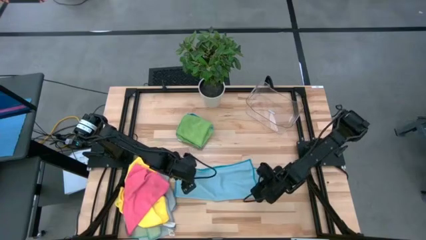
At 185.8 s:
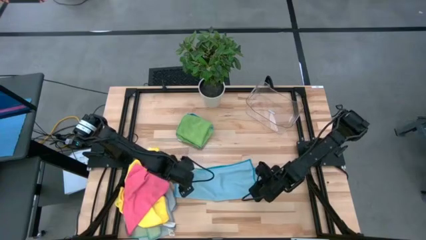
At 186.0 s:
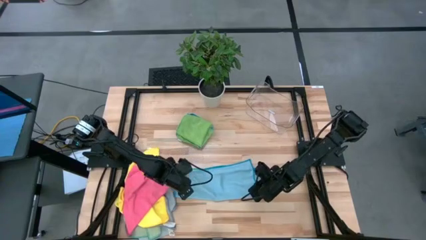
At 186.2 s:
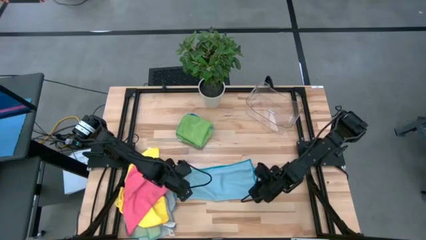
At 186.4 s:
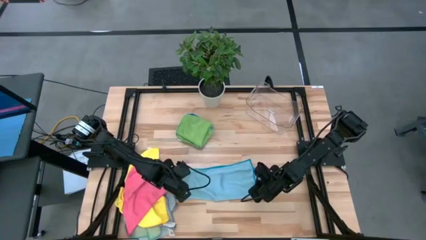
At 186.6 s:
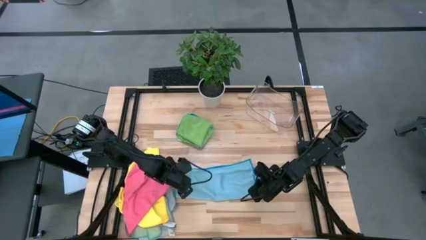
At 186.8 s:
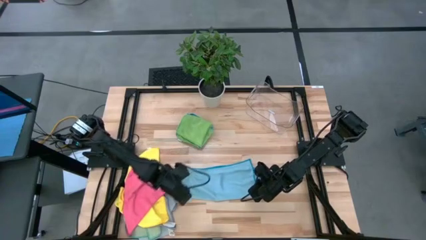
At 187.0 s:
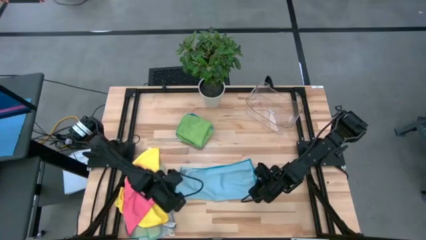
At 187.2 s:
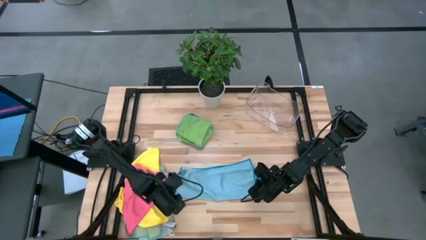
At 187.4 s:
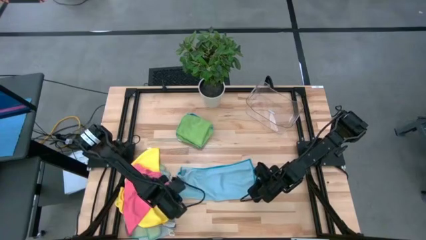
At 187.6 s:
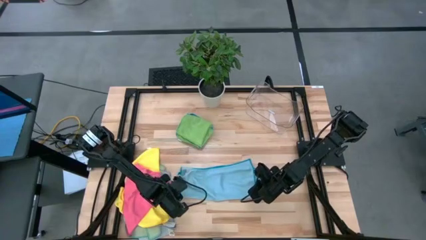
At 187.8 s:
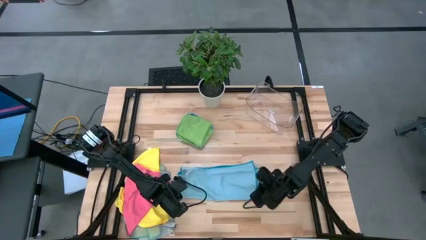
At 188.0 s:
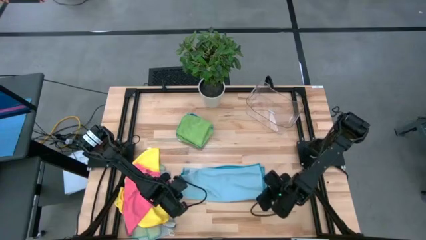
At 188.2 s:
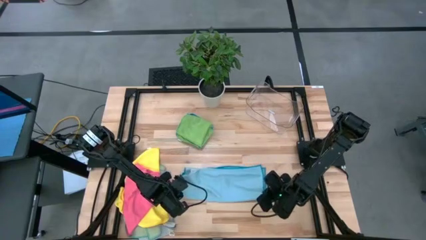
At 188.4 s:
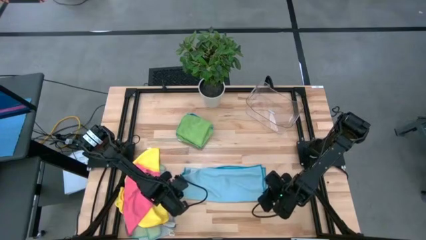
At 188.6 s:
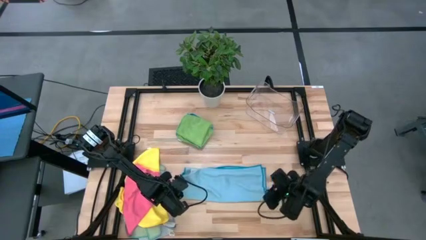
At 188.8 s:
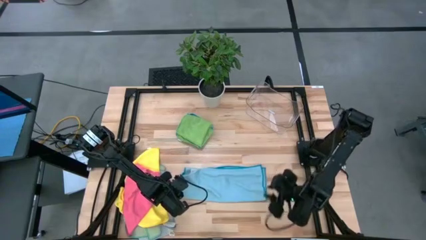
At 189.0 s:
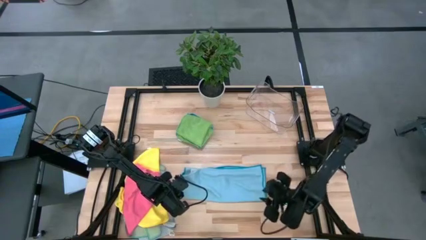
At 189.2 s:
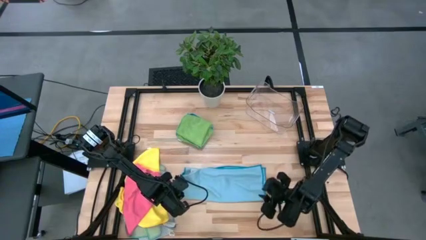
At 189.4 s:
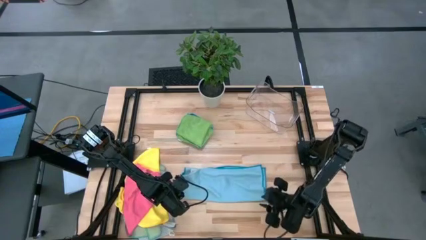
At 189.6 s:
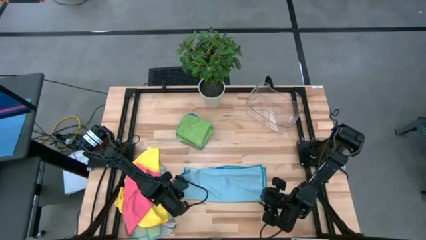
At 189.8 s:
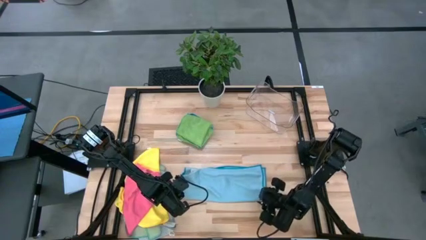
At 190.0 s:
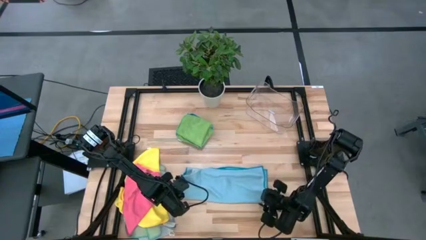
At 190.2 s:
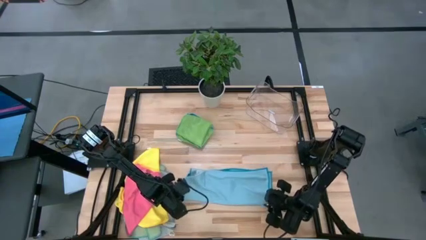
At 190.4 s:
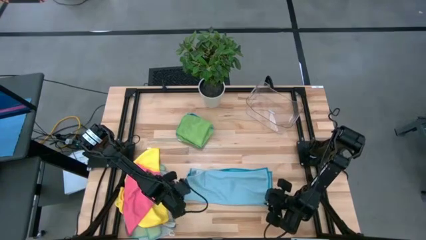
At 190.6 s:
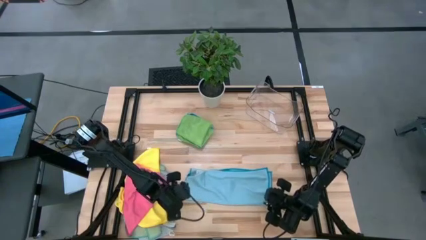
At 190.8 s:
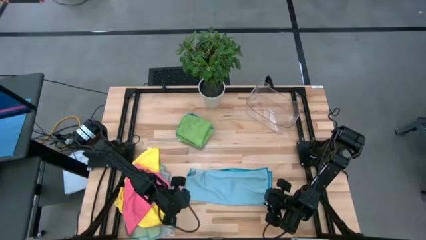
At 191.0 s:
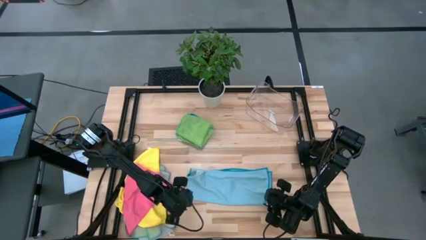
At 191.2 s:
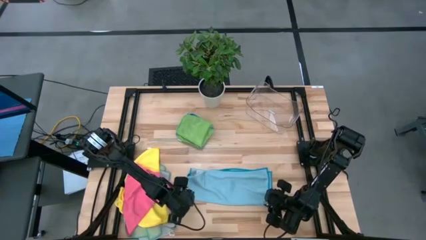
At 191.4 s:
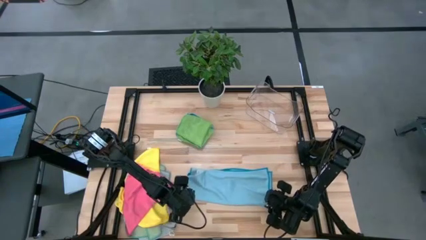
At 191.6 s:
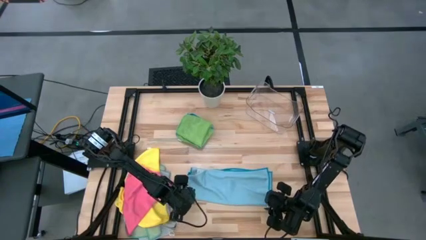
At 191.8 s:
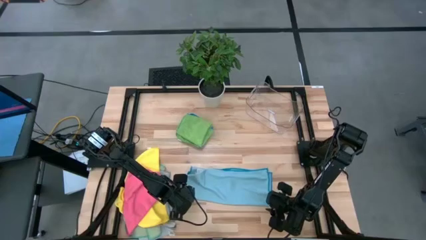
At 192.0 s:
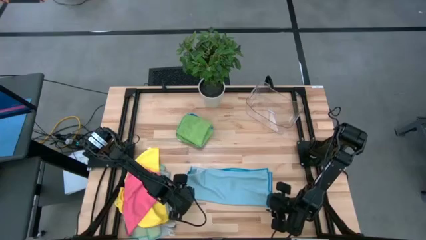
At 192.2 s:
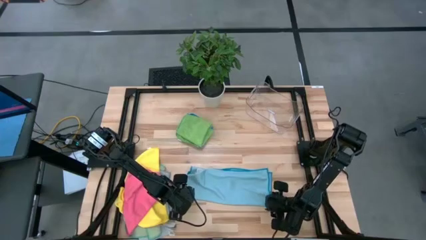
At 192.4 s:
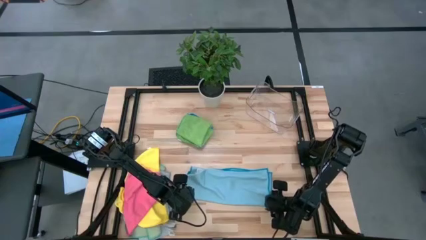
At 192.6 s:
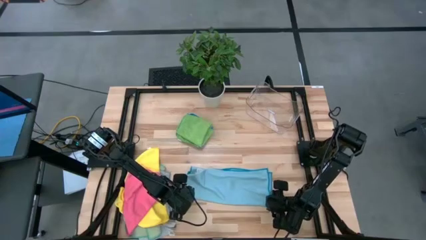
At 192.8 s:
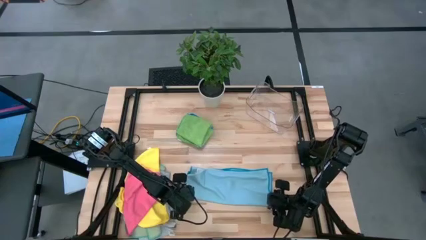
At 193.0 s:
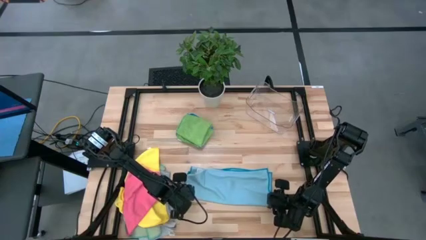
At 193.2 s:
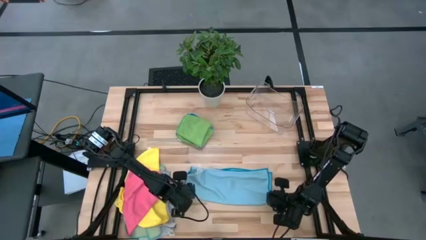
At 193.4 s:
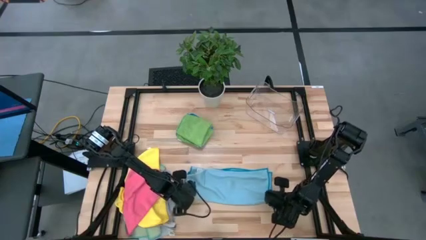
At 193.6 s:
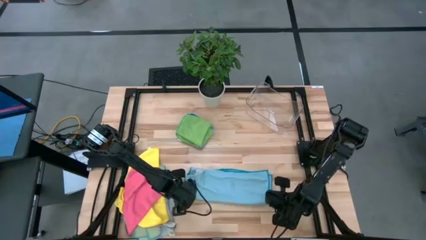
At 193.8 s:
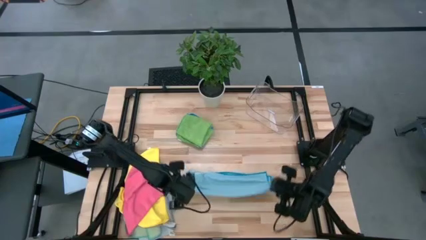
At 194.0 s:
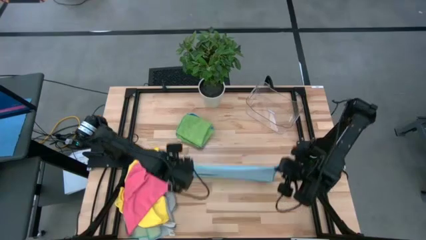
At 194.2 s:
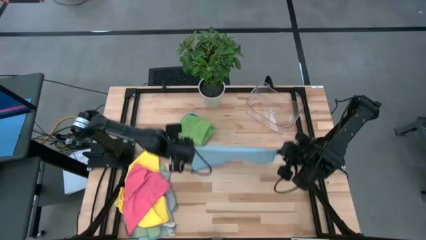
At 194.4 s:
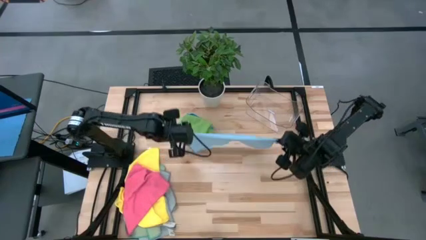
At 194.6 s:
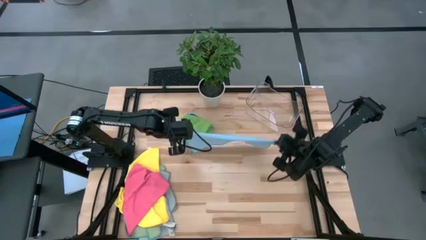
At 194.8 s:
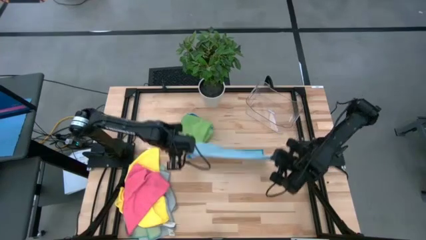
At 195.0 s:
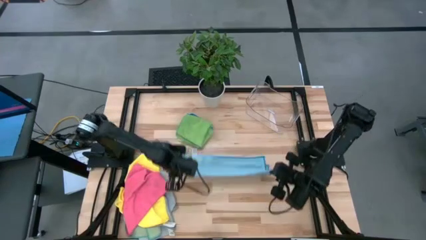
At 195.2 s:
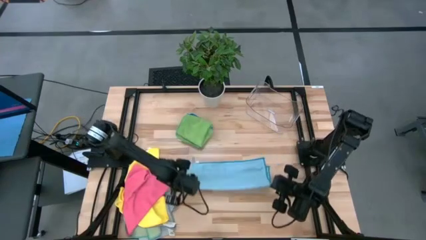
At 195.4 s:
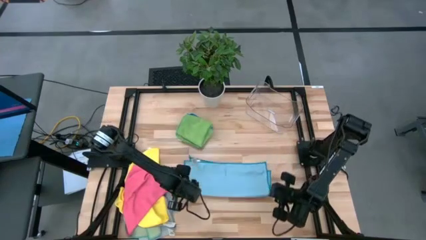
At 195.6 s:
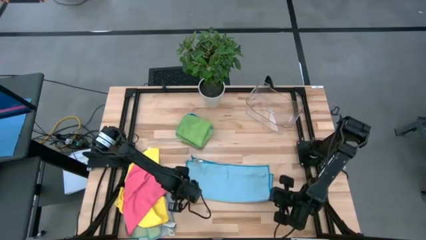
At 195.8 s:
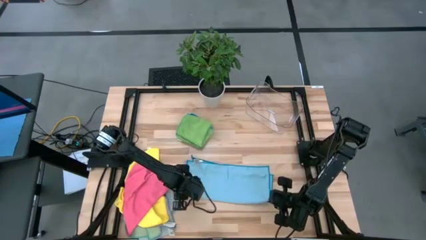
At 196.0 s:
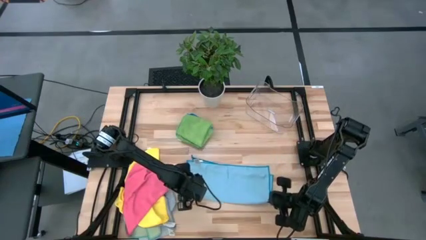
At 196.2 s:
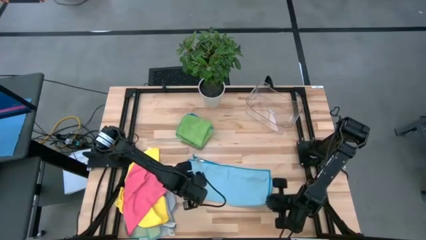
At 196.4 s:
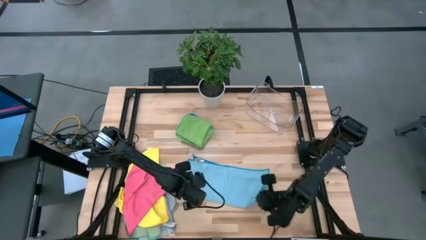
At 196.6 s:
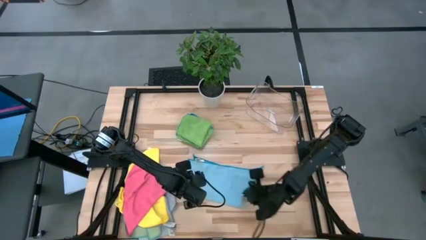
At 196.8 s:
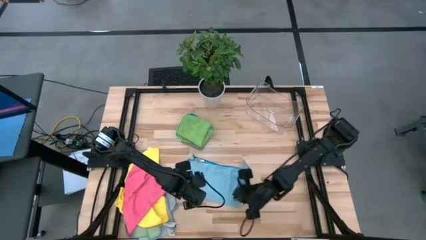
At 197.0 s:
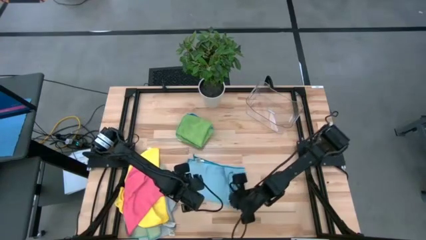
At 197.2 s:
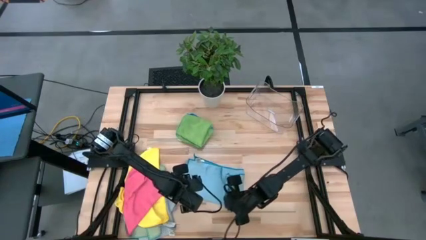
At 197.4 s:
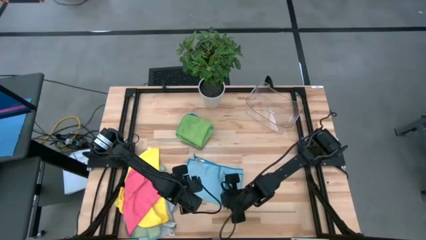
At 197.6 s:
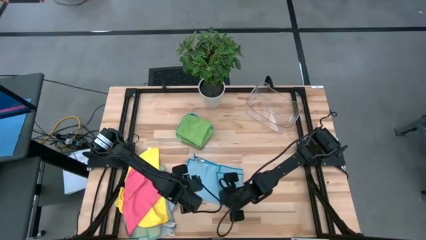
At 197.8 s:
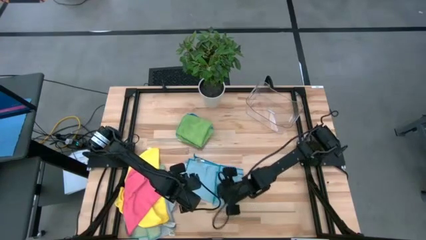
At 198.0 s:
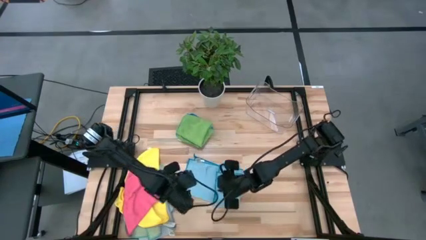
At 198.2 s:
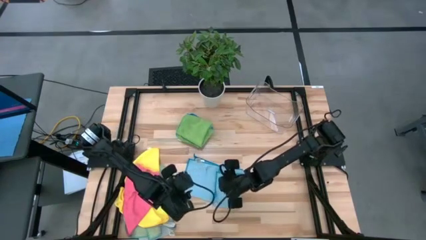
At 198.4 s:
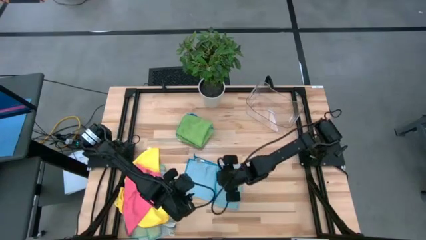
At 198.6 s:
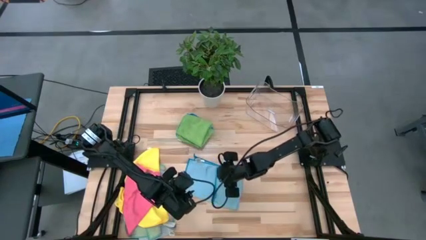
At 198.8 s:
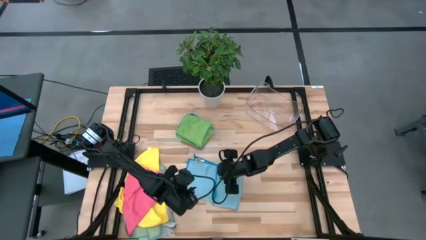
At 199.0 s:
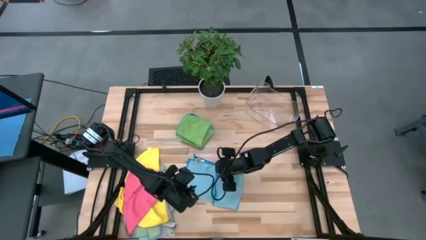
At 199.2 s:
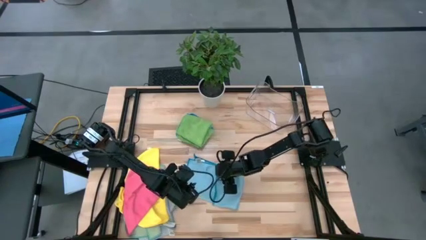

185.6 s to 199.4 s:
Task: Fold microfiber towels
Fold the light blue microfiber towel

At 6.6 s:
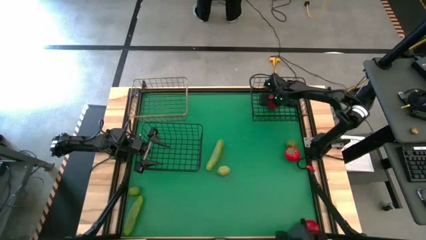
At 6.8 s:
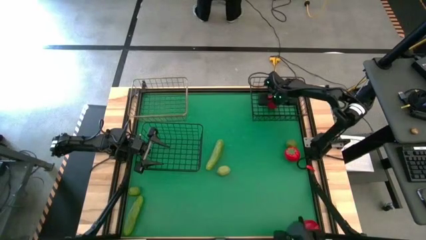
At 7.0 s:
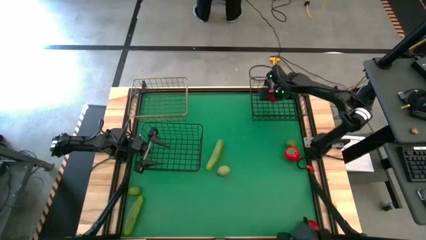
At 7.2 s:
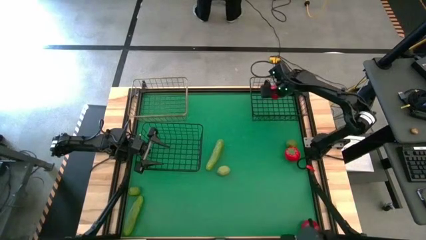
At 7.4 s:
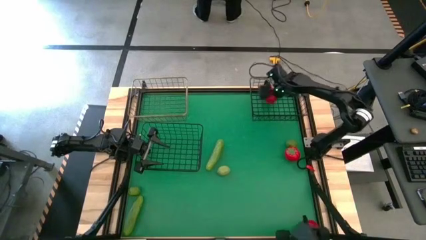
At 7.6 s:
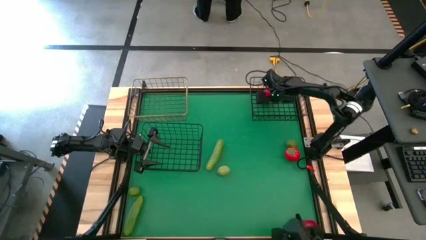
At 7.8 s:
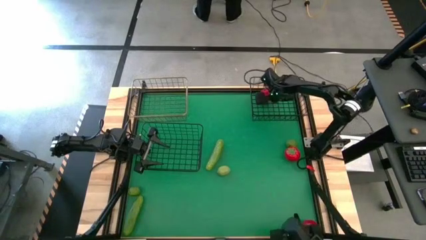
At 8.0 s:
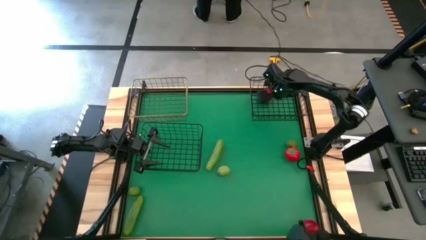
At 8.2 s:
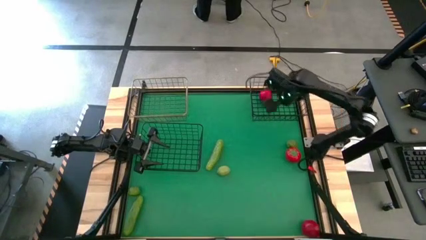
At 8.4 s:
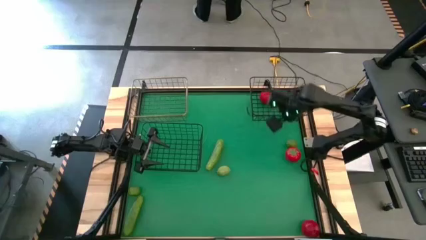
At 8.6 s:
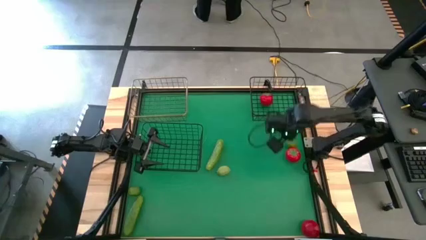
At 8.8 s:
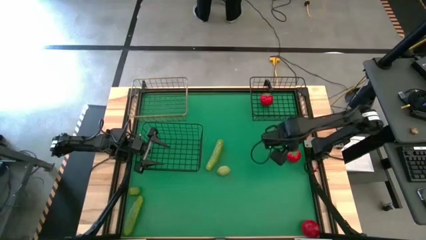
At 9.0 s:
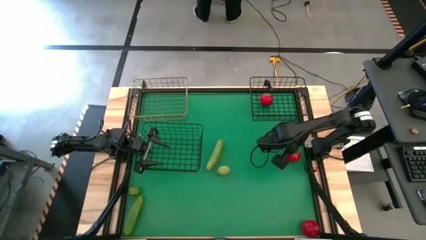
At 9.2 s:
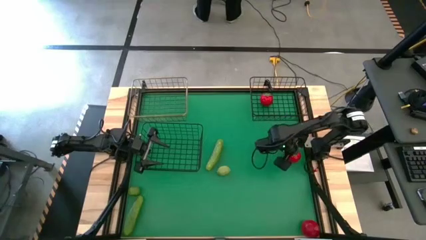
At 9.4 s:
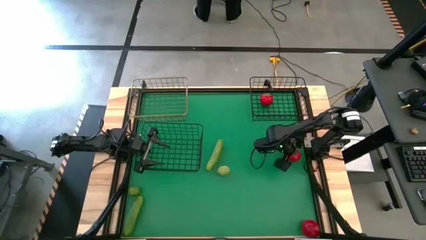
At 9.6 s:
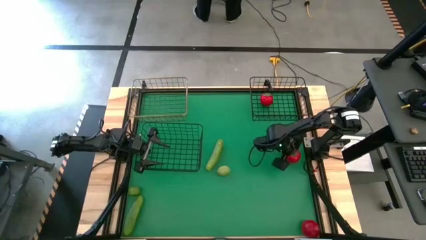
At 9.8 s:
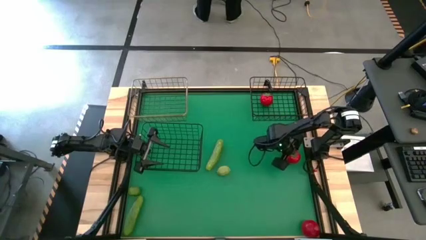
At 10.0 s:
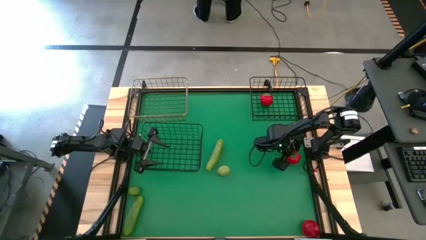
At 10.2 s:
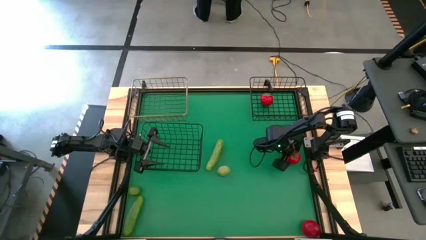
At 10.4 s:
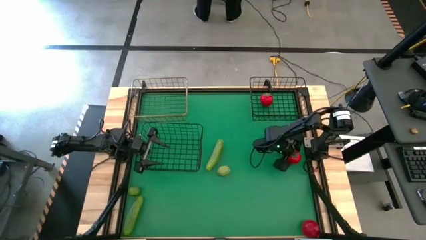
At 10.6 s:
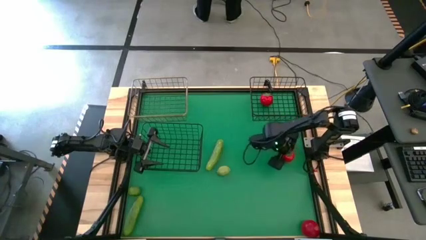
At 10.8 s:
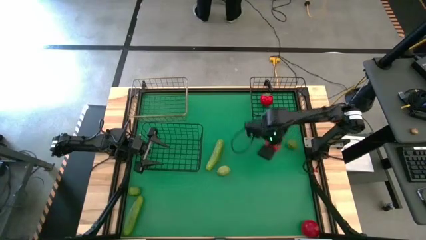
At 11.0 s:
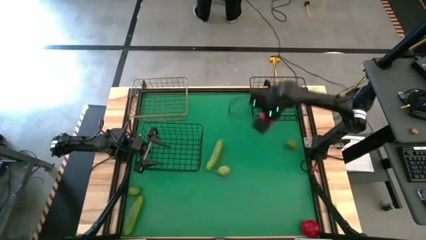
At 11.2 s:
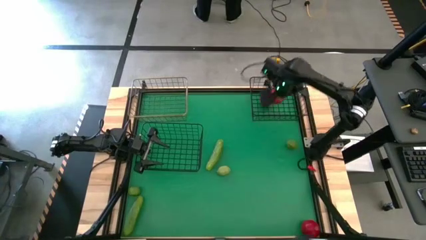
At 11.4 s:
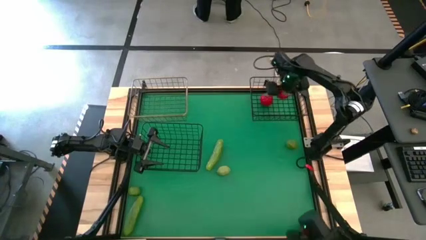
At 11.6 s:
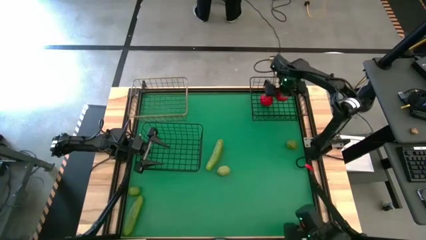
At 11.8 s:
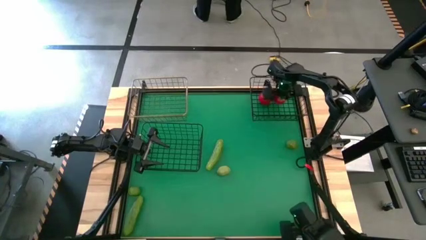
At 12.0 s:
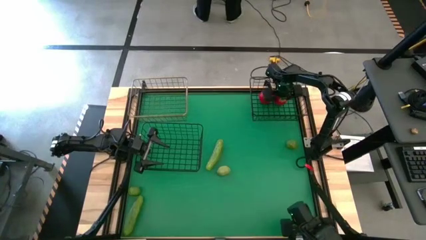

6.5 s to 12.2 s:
Task: Sort produce into baskets
Put the right tomato into the right black metal wire basket
